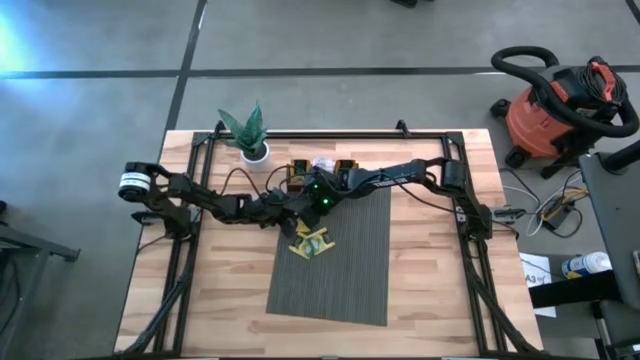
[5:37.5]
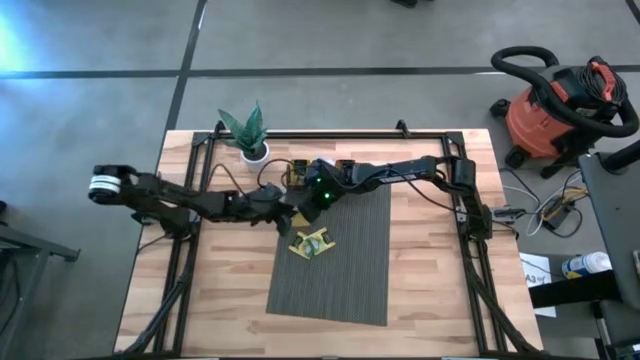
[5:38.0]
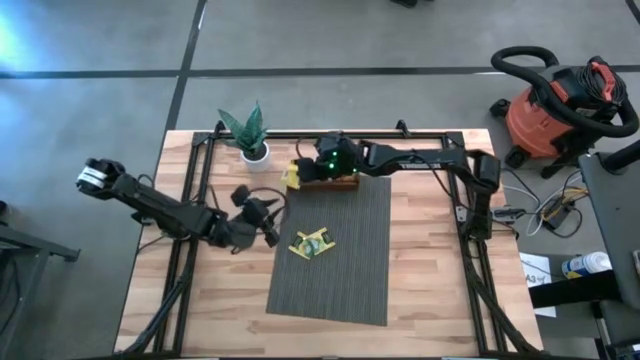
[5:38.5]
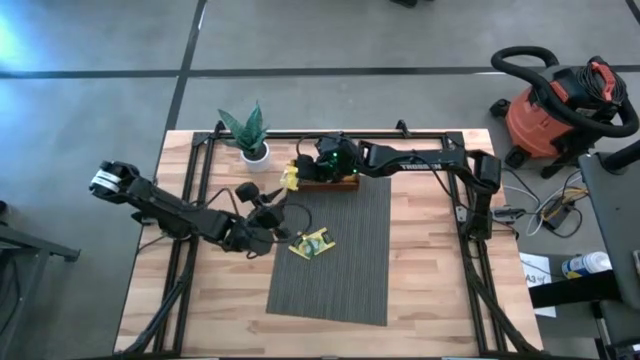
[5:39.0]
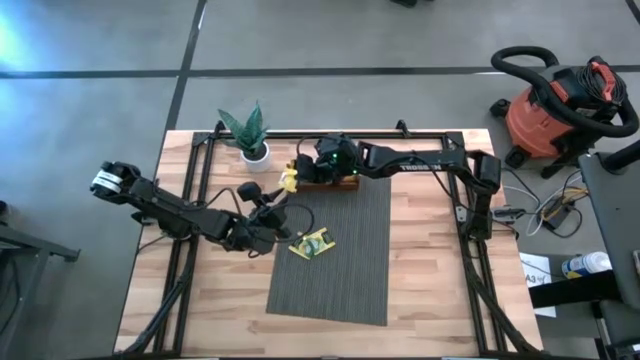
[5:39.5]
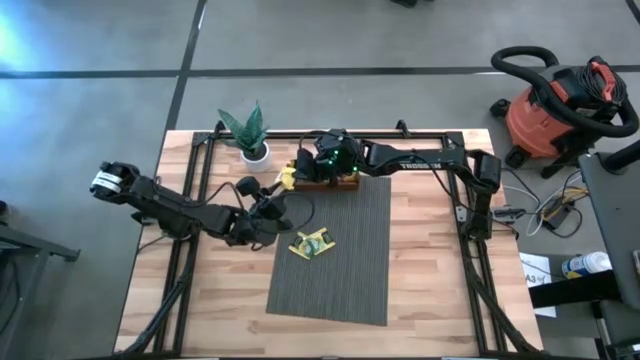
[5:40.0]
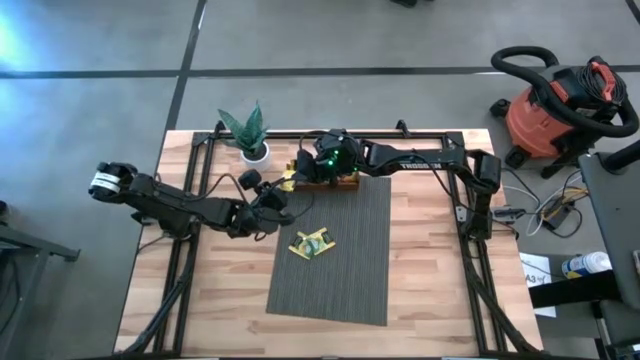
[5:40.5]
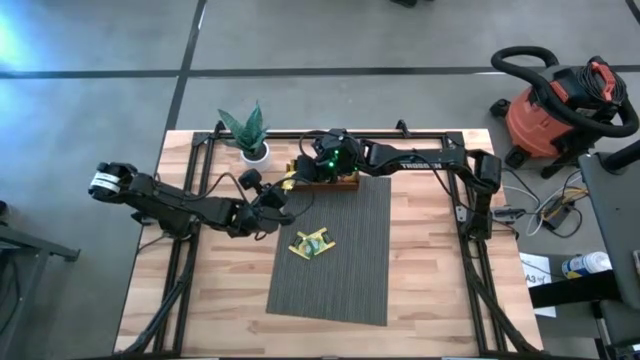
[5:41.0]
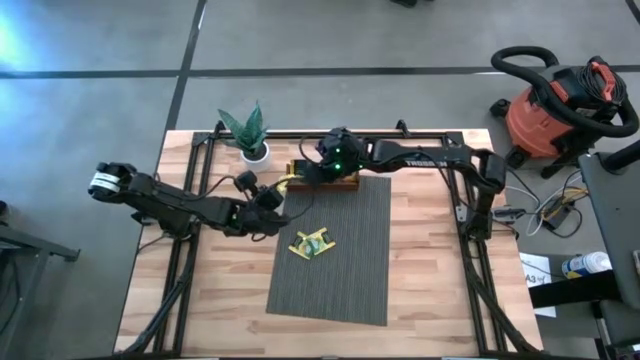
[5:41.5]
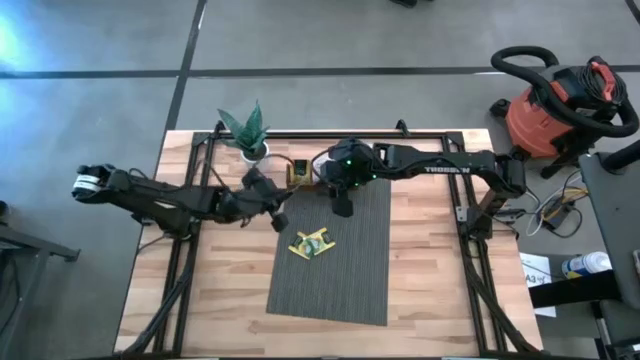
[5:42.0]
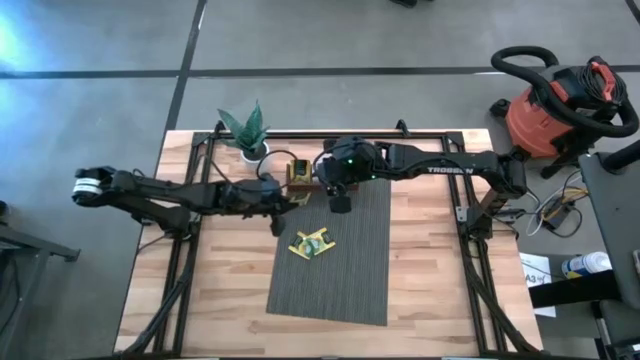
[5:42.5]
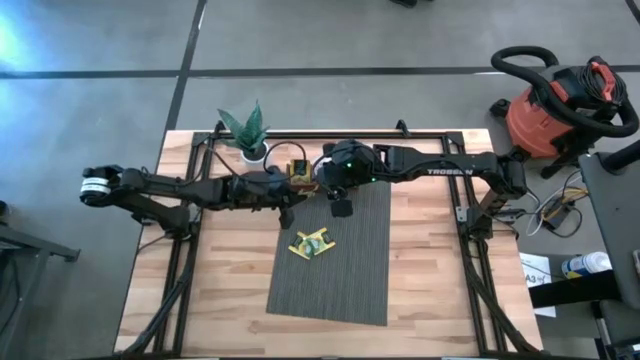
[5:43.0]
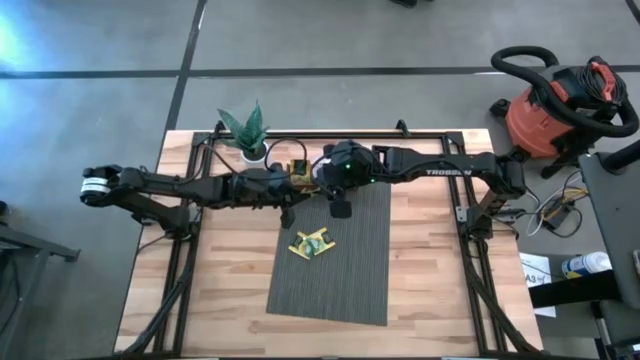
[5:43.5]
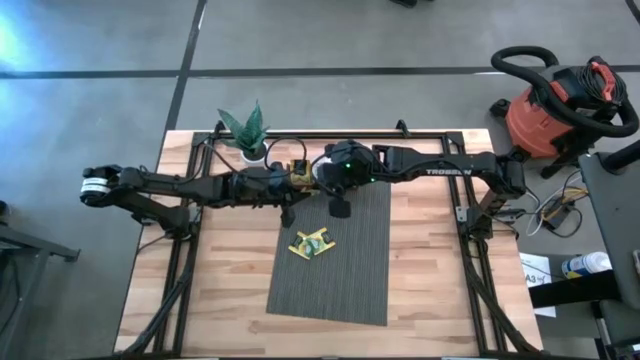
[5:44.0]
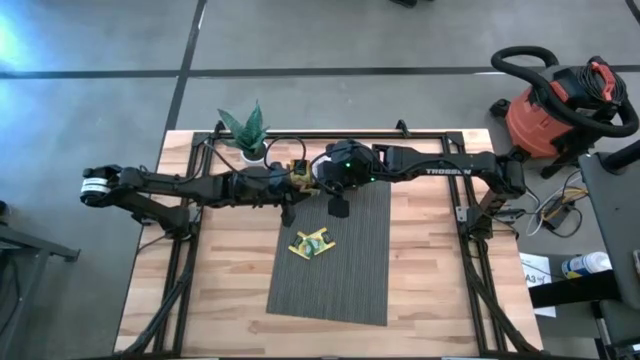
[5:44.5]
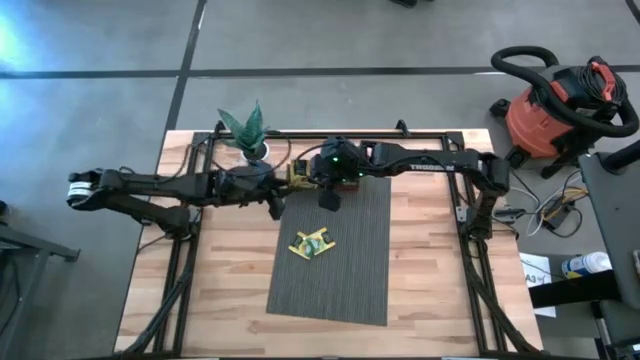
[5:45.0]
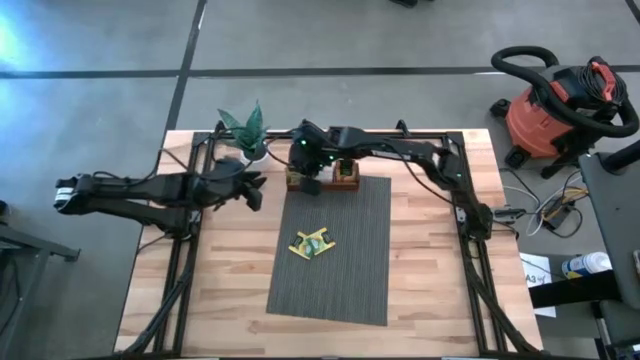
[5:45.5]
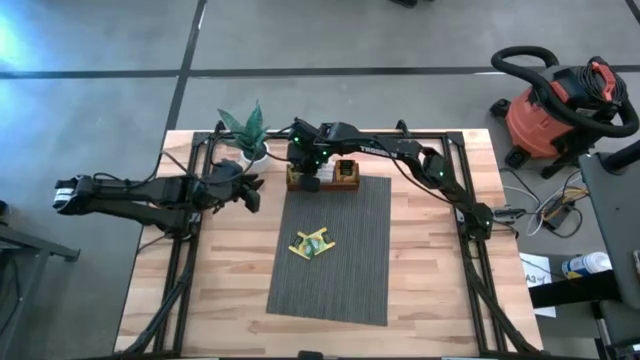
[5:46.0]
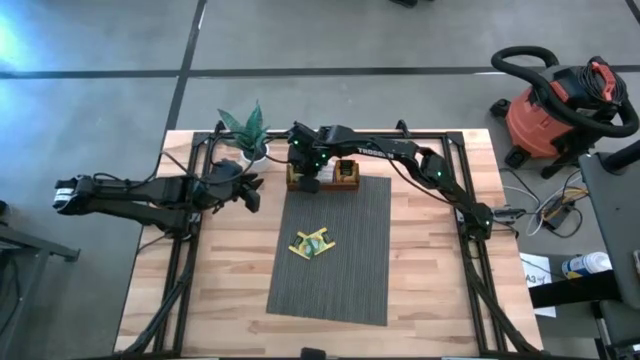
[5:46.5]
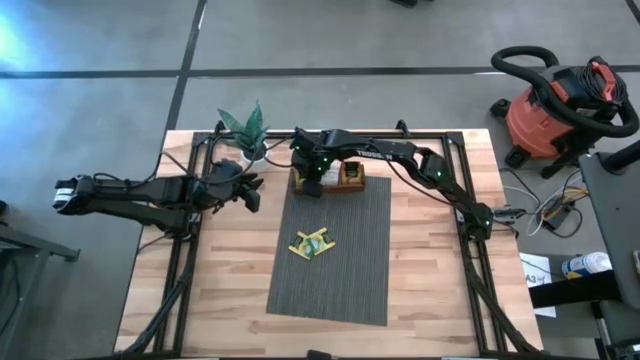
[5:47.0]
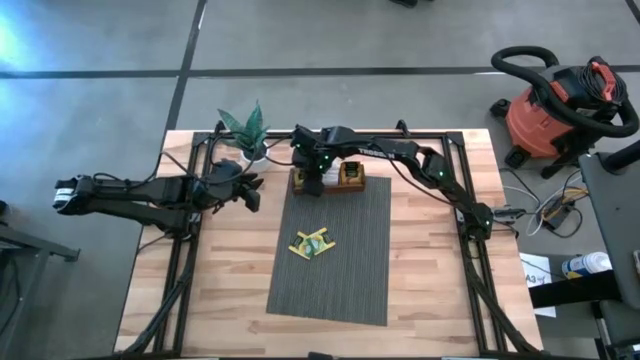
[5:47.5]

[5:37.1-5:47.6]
Task: Pick & Place Tea
Put the top yellow tea bag into the left compartment of the wooden organizer

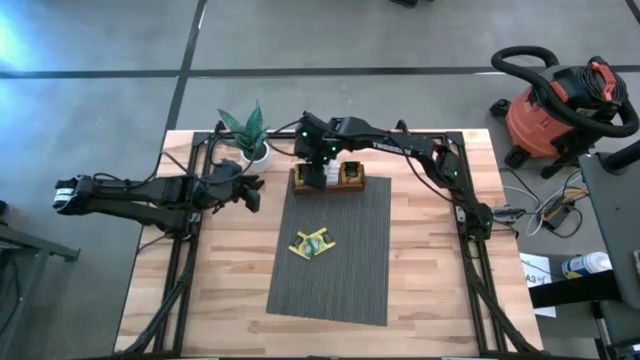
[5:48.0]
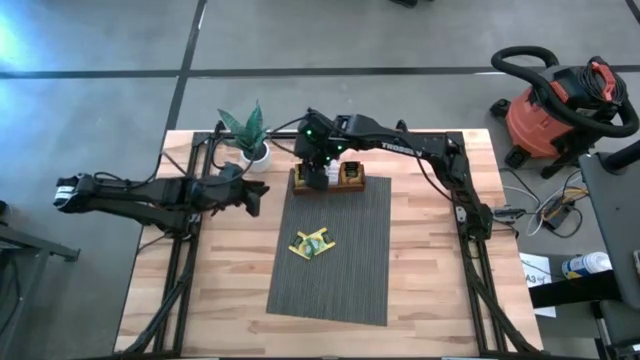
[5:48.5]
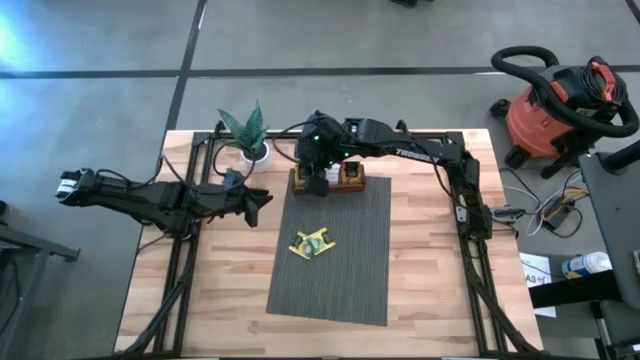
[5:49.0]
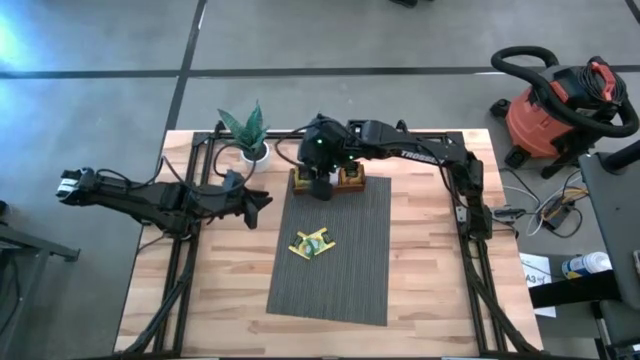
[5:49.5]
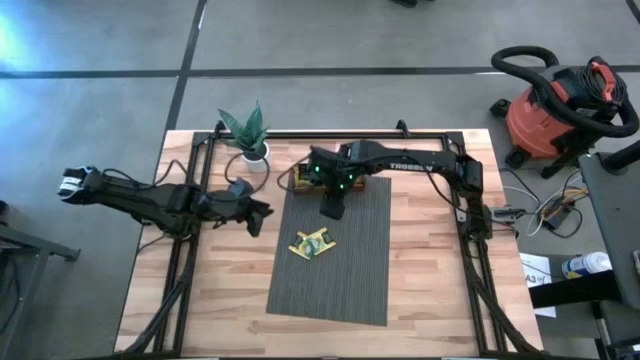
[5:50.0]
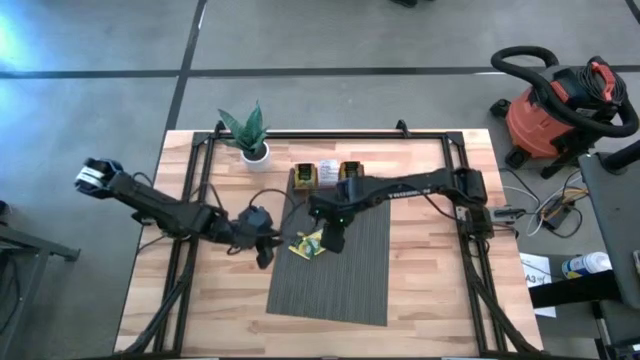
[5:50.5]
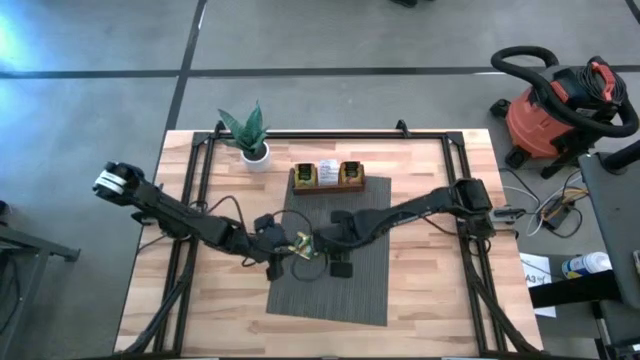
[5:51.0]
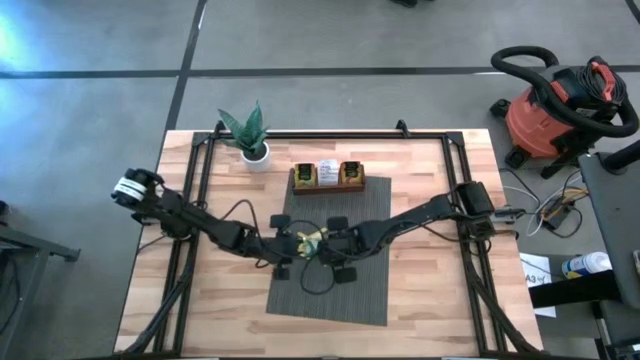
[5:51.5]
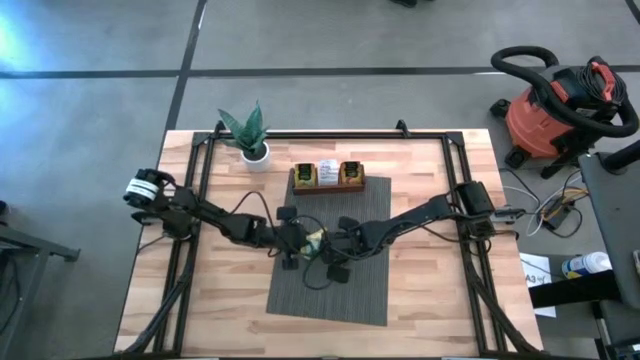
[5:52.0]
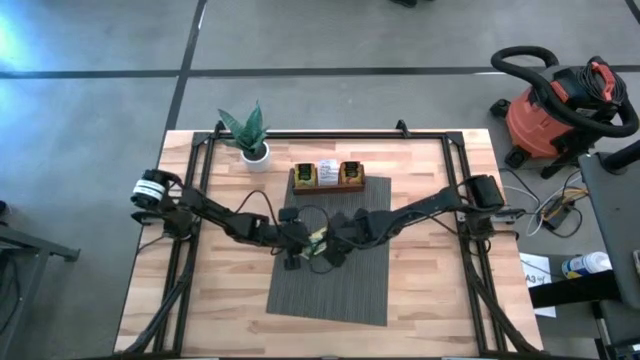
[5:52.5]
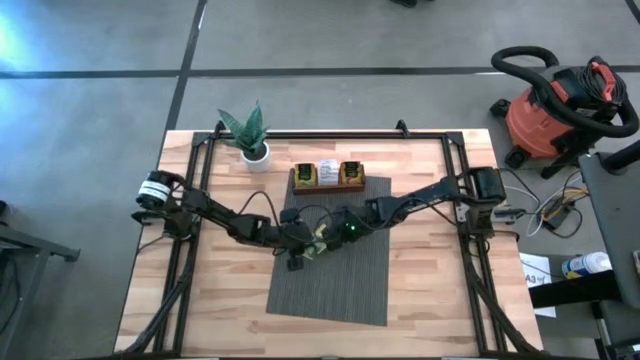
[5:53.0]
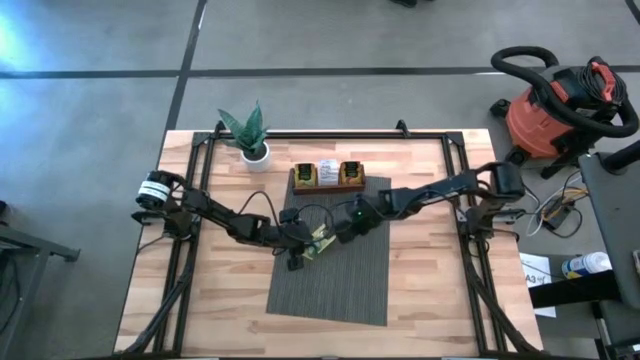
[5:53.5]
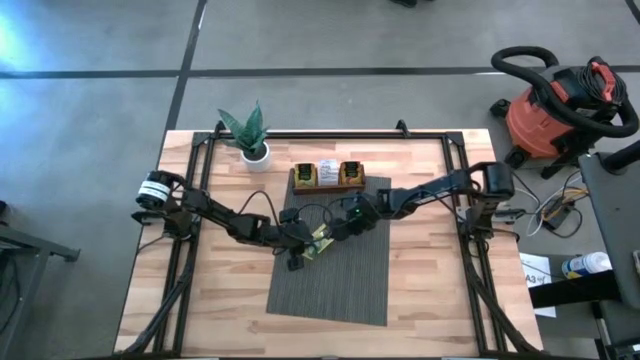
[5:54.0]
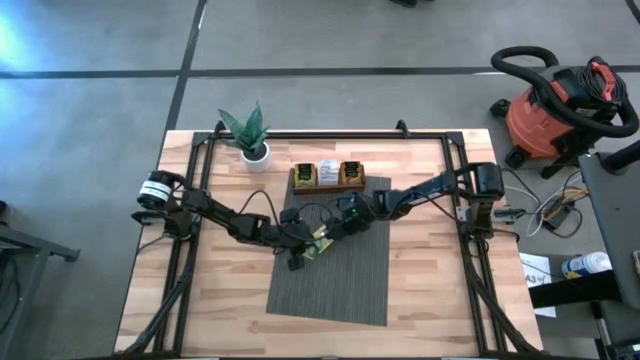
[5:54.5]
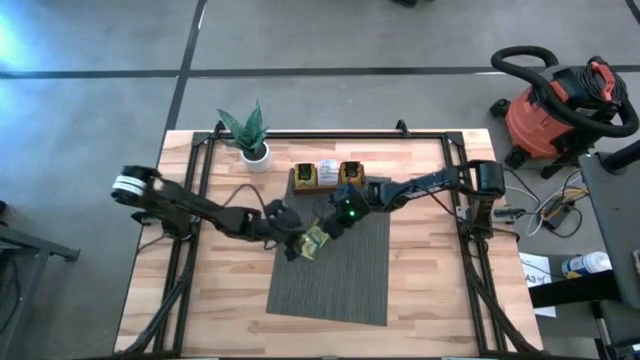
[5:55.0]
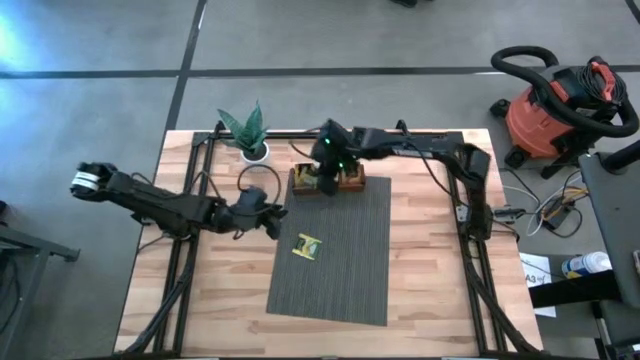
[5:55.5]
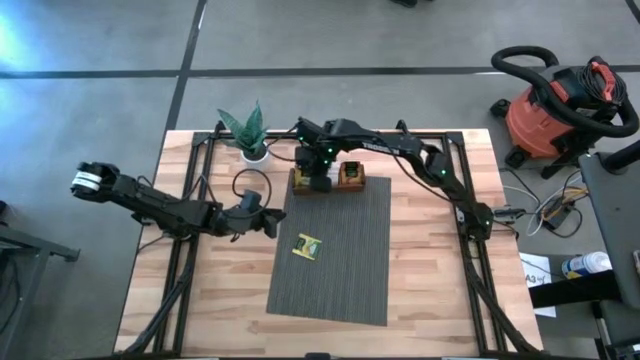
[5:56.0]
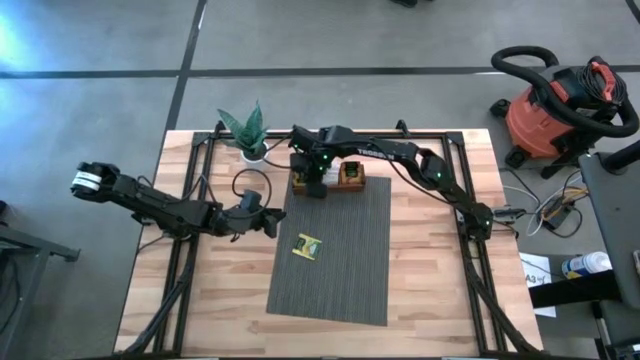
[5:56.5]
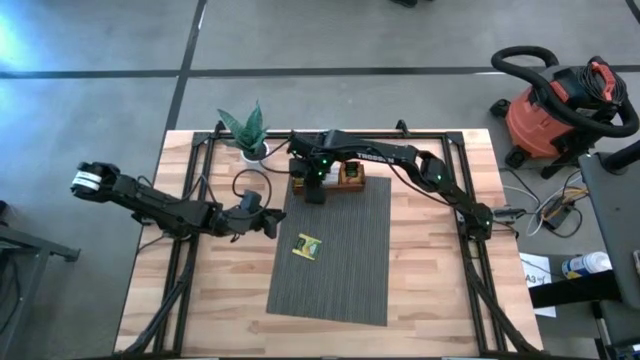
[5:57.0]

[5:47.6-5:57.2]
Put the right yellow tea bag into the left compartment of the wooden organizer

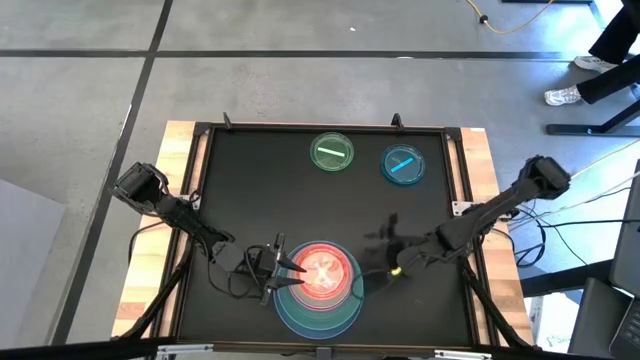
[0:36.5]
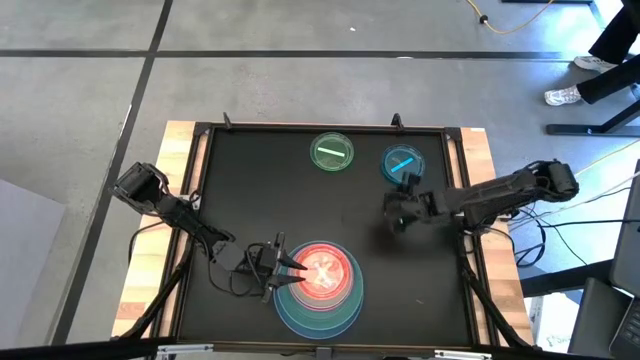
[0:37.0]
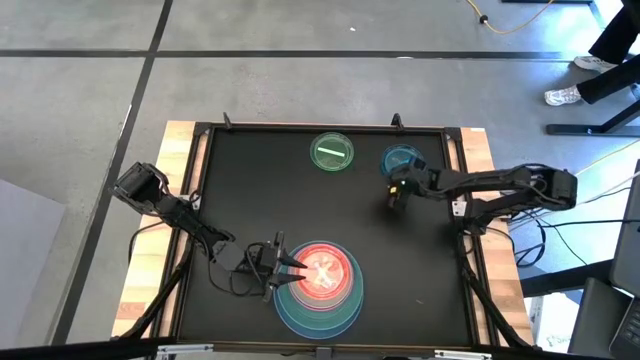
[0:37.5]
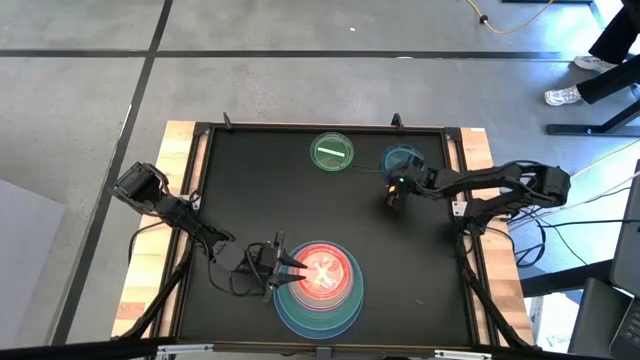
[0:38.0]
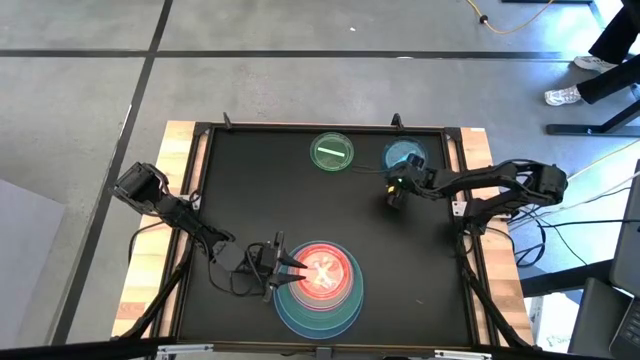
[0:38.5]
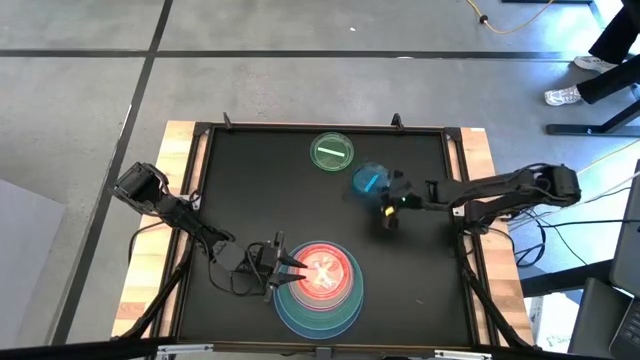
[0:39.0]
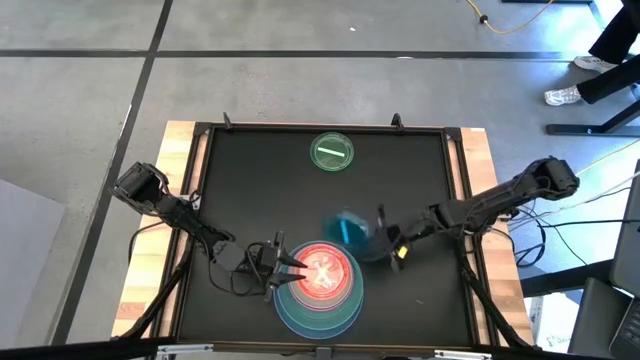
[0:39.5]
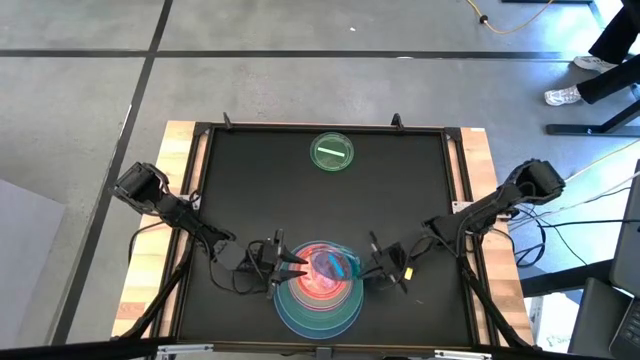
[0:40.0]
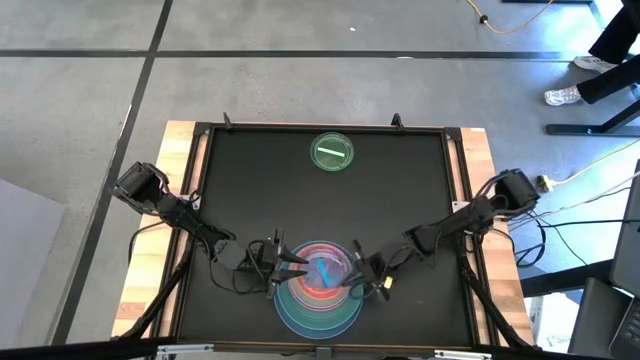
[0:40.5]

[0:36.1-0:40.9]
Task: Stack plastic plates
Stack the light blue plate on the light pink plate
